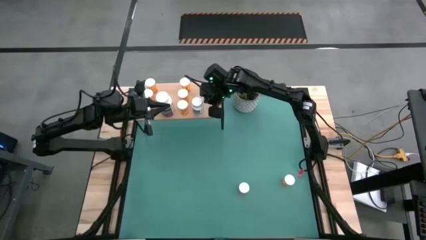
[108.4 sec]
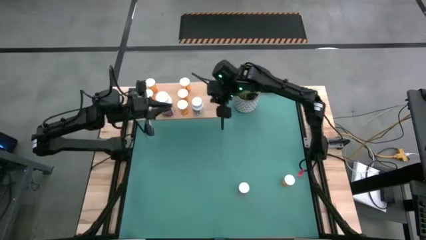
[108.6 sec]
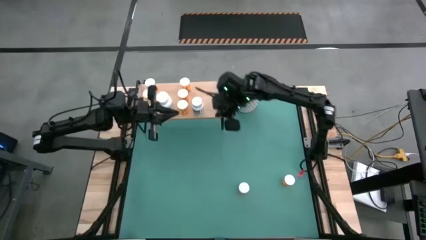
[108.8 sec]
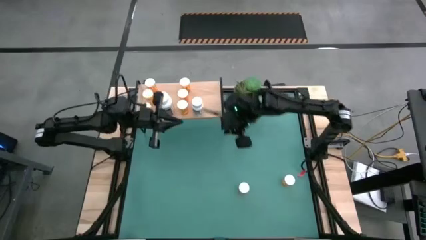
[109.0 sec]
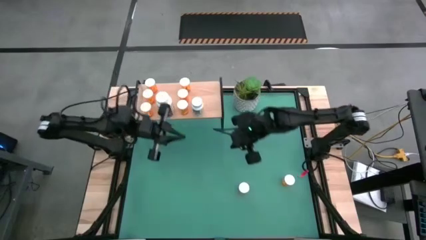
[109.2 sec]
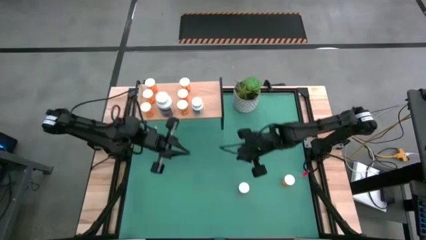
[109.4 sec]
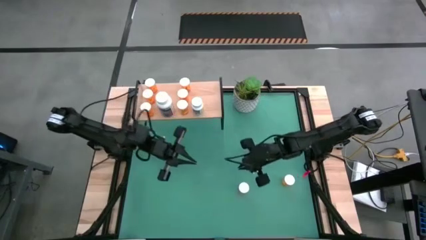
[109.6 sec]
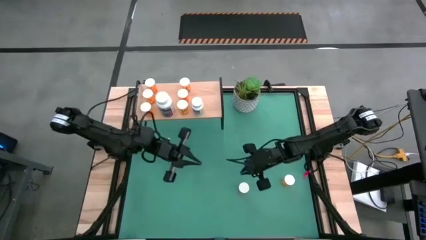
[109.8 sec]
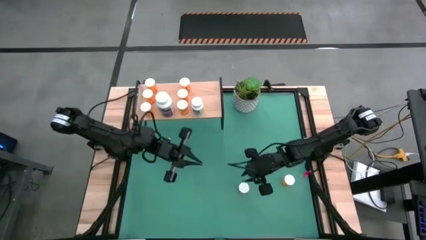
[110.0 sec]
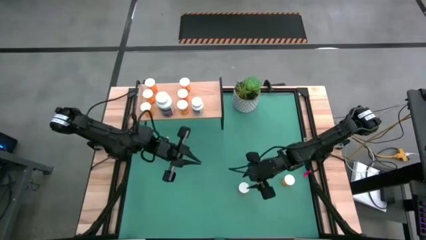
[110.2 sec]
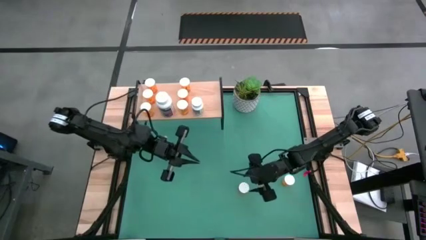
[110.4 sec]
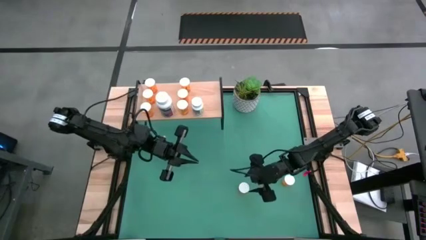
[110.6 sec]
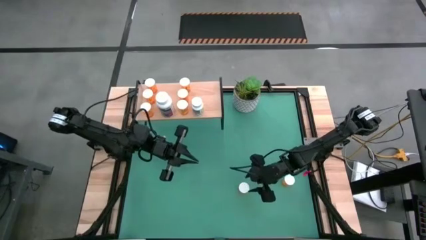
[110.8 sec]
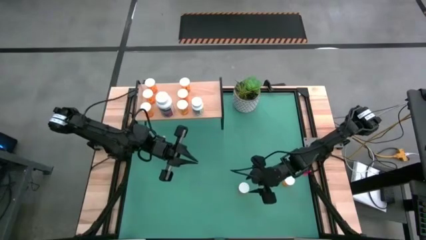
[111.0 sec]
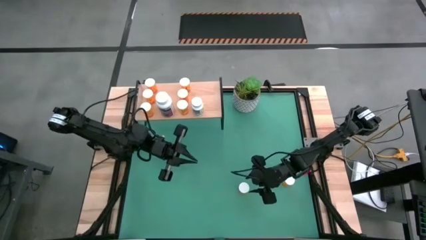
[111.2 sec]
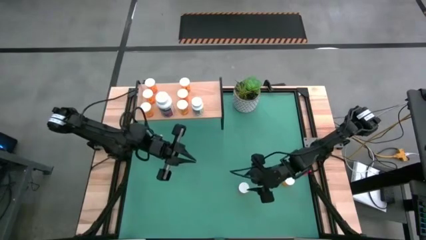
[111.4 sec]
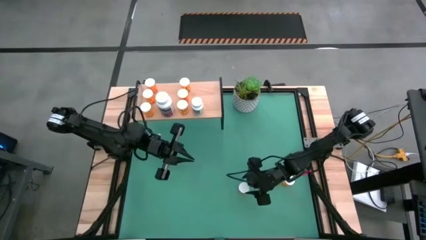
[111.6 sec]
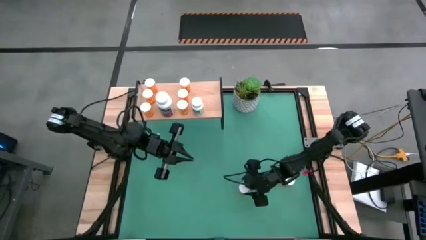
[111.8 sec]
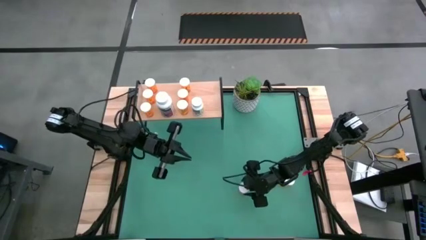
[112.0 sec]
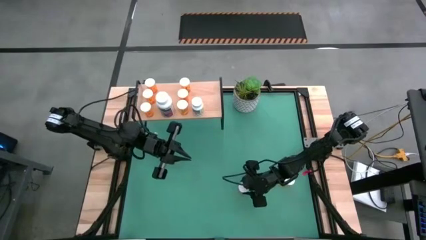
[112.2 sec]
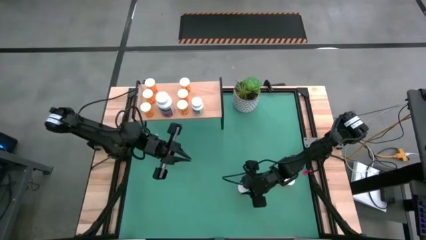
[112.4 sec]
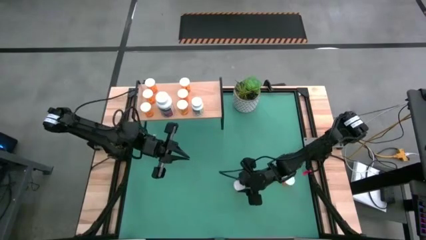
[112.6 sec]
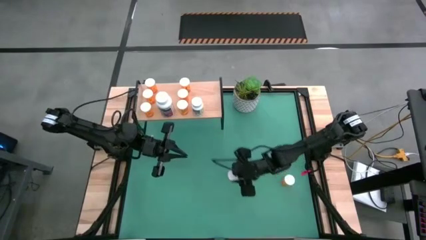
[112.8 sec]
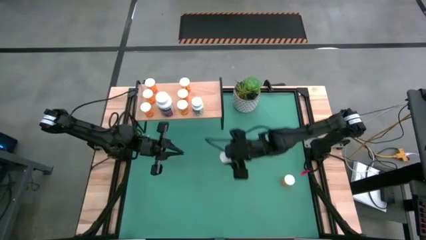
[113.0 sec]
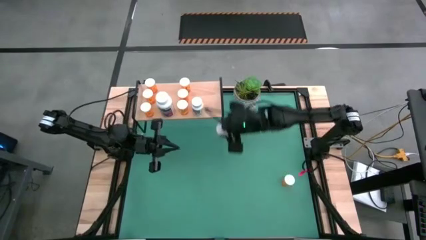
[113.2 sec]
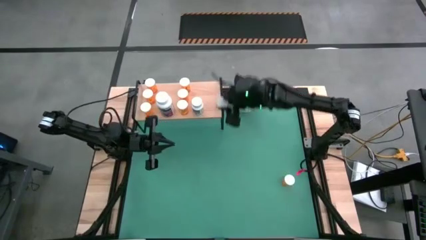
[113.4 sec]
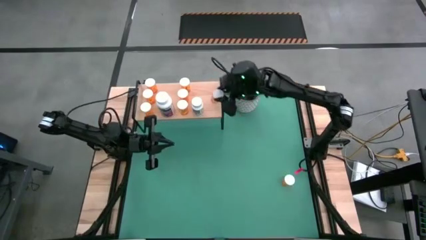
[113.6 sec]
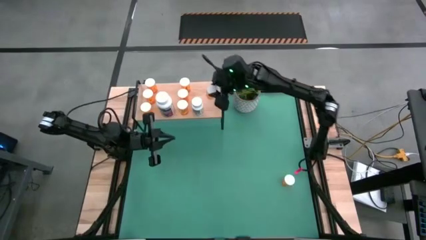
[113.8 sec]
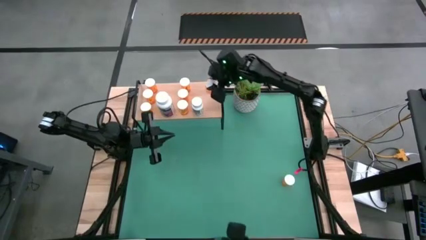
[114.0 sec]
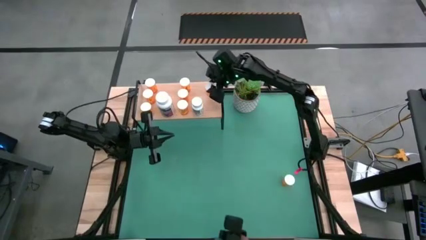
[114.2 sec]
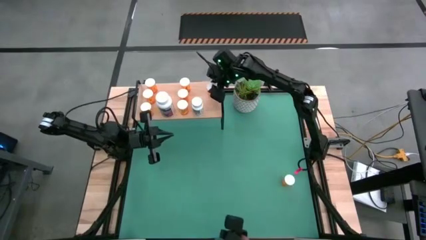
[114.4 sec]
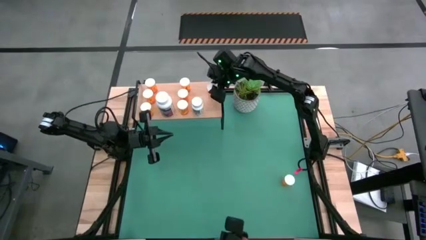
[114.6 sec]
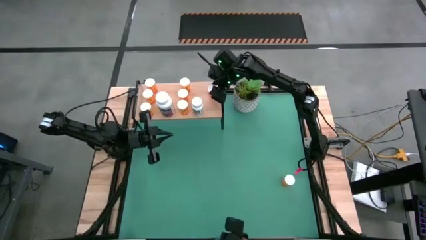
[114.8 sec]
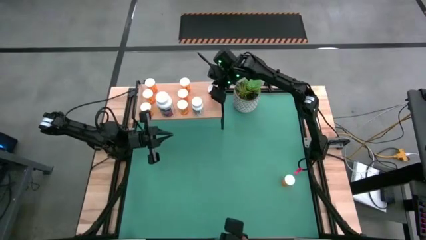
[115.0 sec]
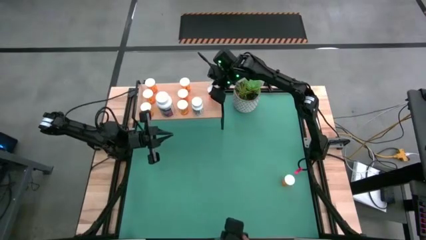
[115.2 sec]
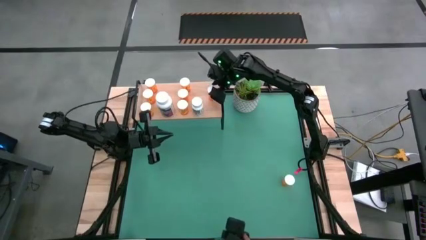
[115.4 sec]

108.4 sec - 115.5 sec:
Task: Pick and place medicine bottles onto shelf by color
Put the orange pill bottle on the shelf

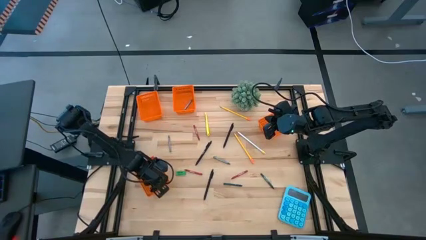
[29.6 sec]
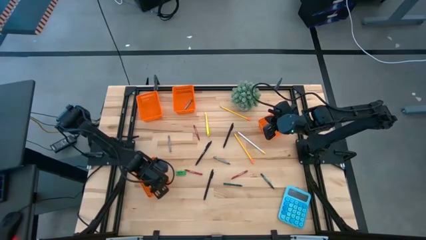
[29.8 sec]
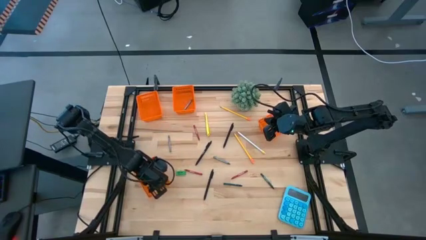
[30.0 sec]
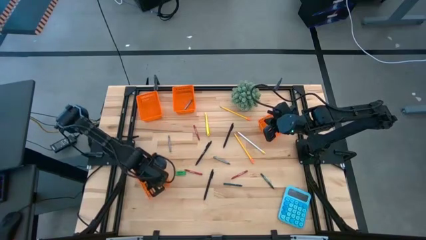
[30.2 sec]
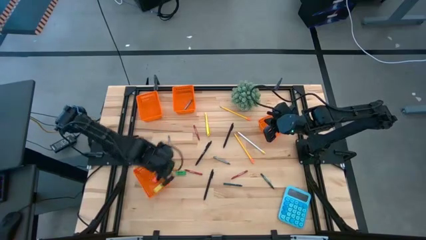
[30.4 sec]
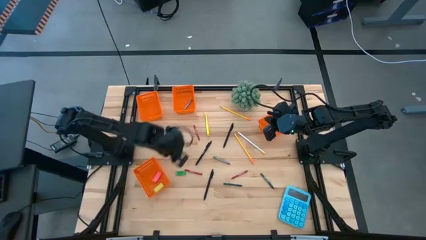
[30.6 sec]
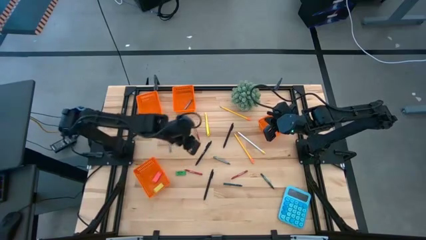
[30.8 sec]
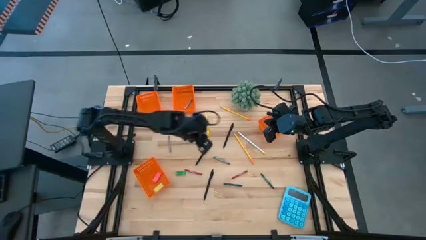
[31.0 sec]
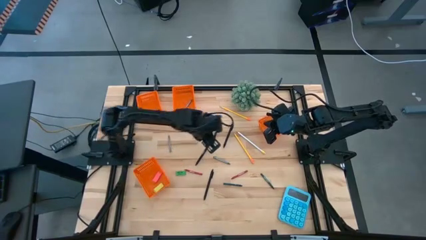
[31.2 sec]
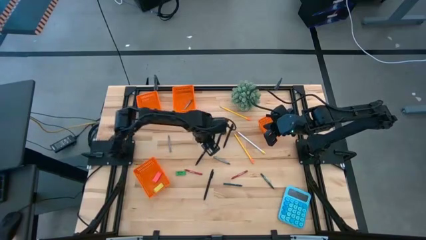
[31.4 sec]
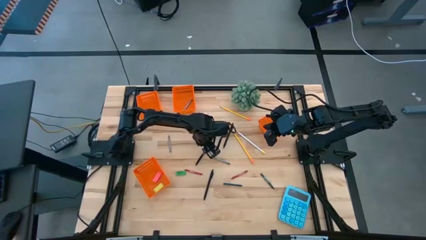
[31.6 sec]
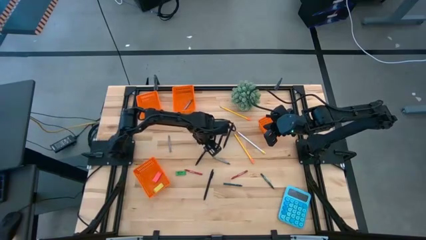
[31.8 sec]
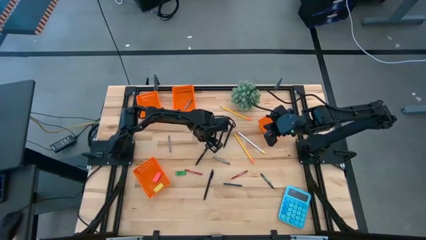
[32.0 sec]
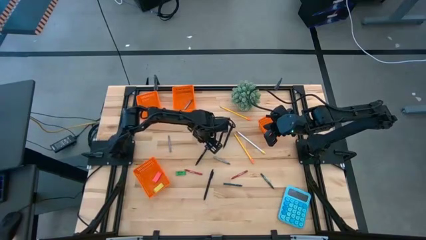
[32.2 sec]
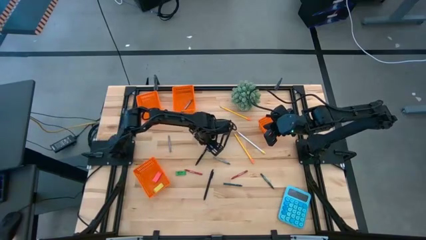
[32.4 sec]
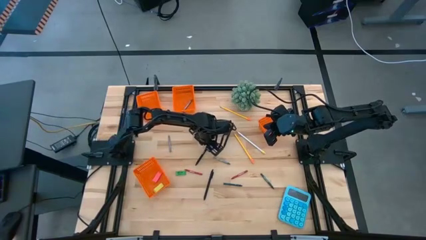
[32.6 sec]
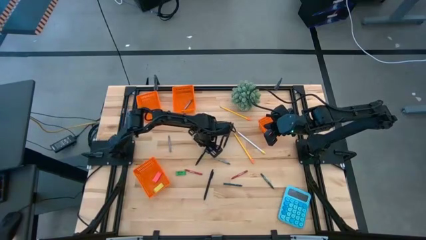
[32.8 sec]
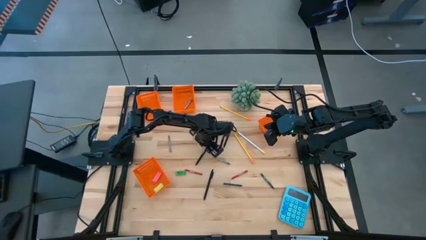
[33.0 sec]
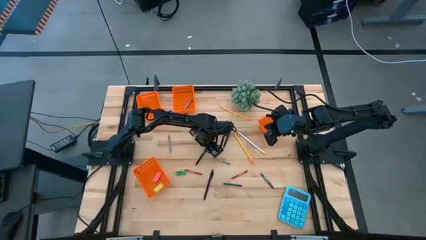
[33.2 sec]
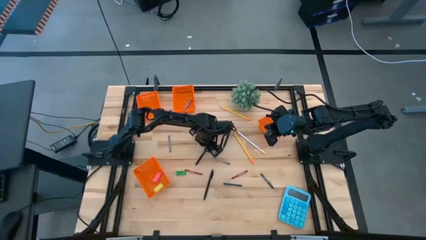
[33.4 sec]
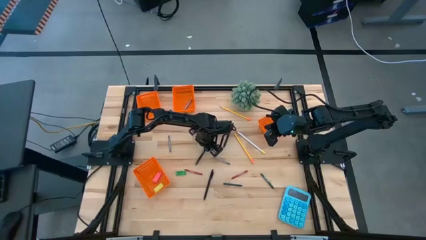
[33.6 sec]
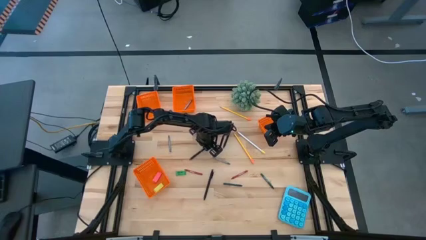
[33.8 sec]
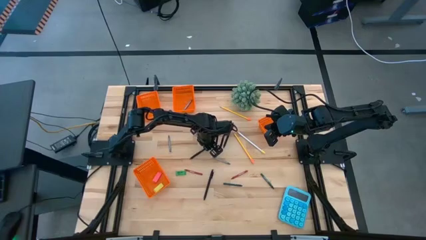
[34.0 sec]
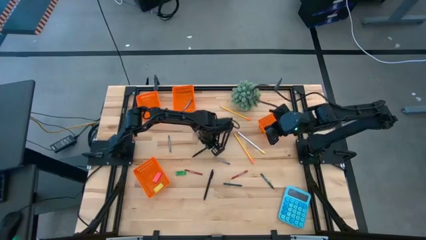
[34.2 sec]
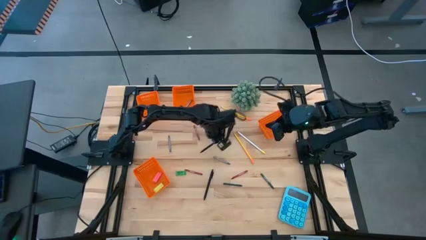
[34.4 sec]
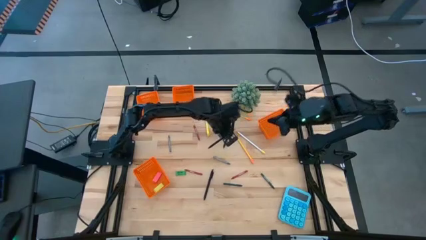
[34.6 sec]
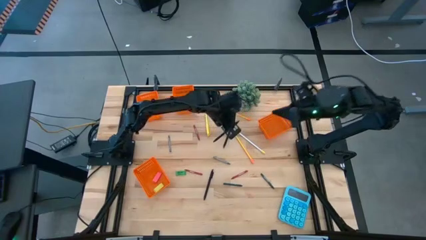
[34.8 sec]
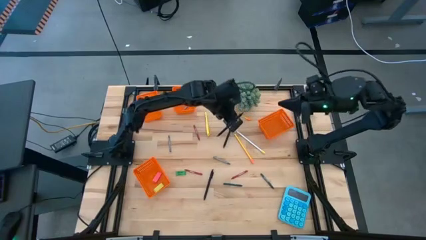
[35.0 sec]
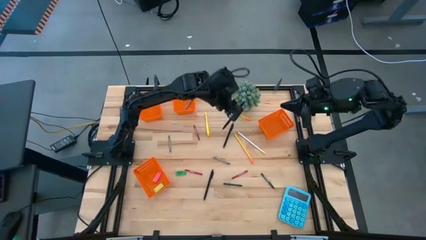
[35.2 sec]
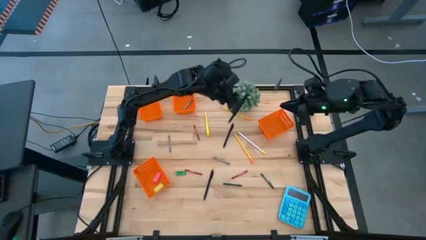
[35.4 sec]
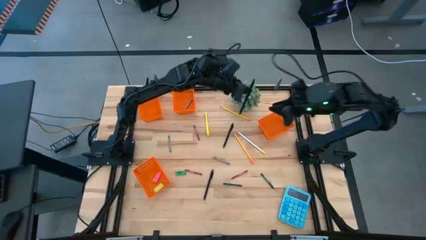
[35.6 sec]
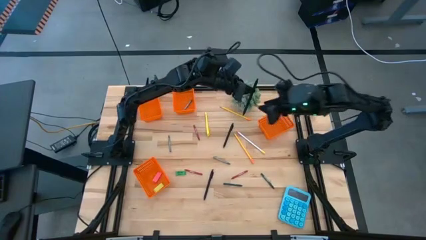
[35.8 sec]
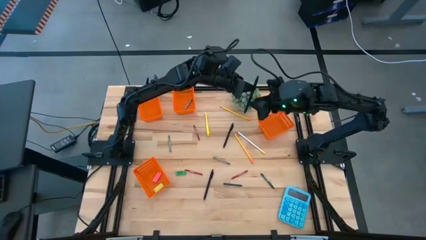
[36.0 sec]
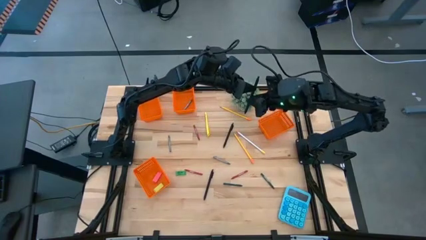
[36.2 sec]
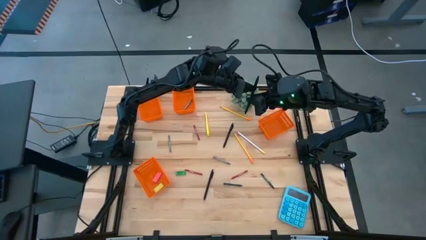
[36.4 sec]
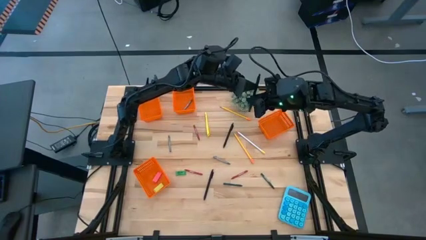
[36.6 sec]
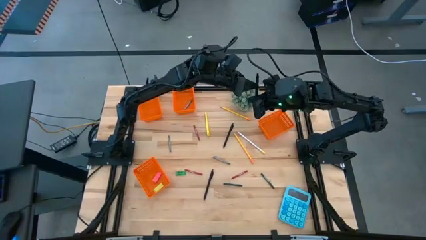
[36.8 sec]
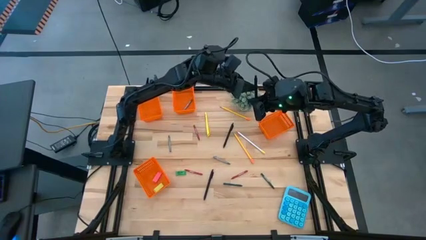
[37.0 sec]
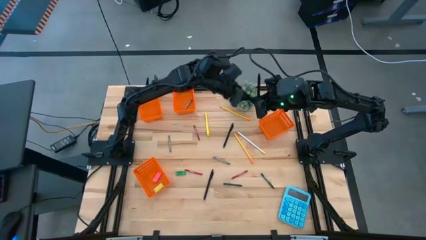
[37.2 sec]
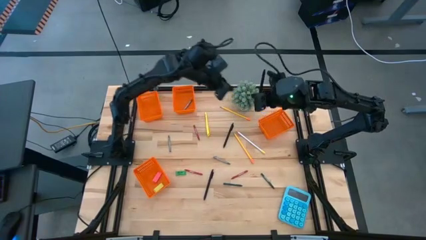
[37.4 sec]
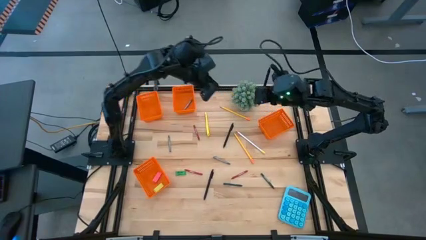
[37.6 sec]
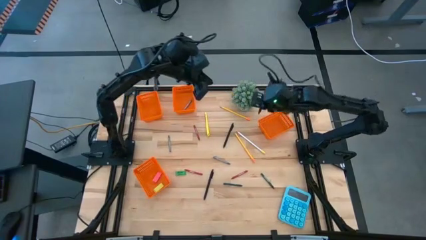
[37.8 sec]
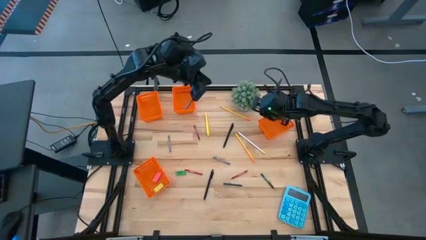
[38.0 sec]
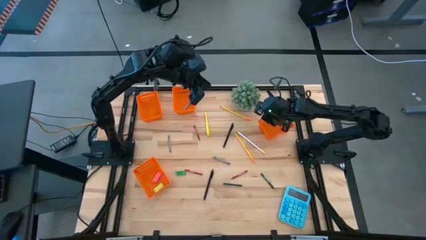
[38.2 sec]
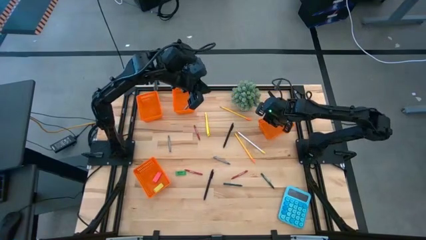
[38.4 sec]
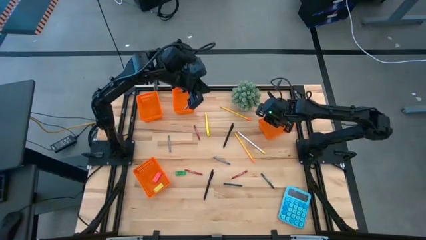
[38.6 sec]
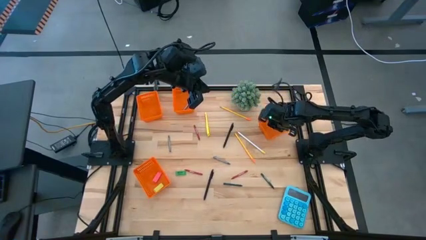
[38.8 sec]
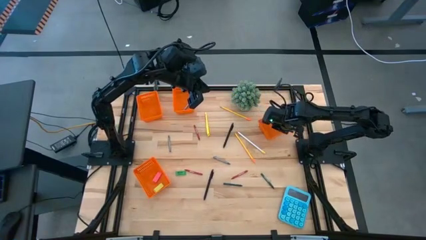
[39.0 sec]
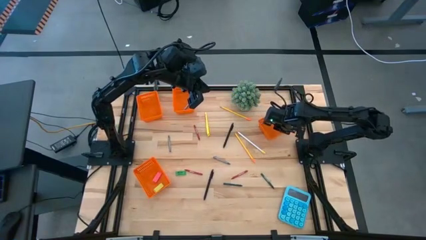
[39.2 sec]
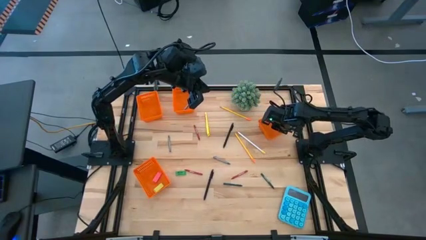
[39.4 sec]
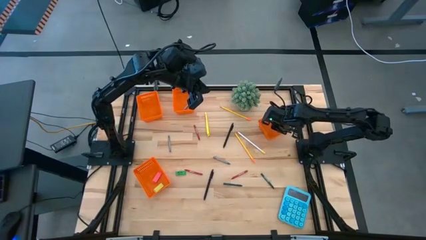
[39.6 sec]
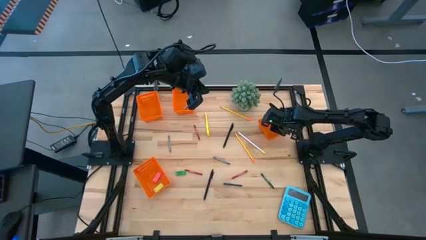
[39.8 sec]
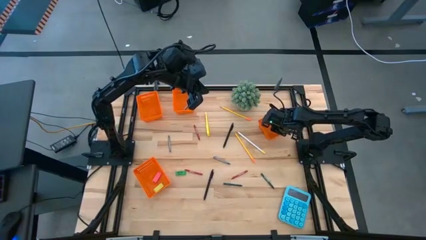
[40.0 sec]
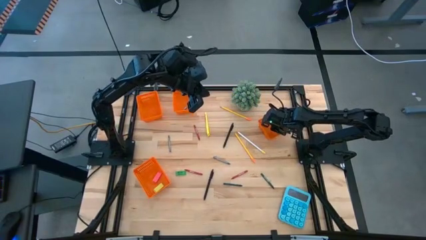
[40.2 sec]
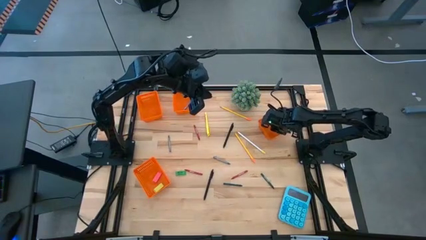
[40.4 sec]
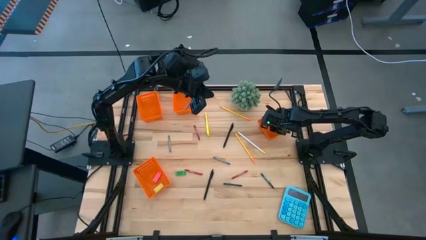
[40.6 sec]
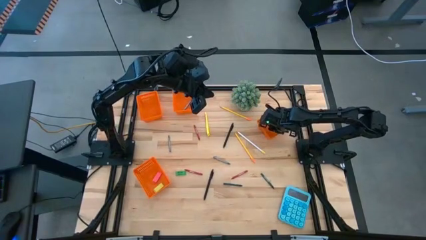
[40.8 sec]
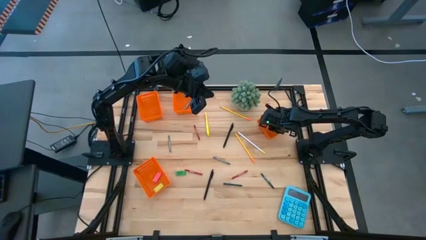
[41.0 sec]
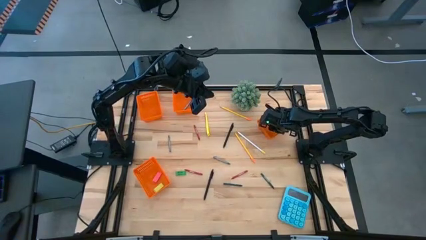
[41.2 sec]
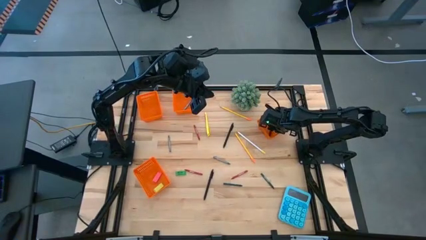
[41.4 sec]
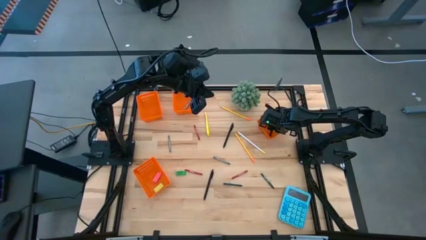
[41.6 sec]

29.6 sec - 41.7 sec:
Task: Sort crayons/erasers/pens/pencils in bins
Put the middle black pen into the right orange bin
